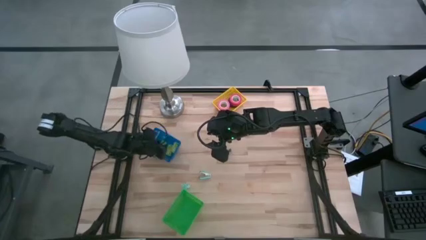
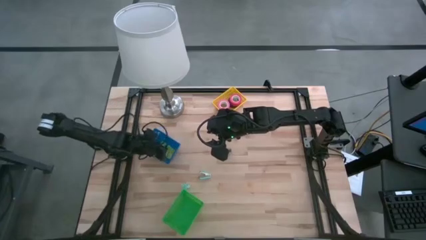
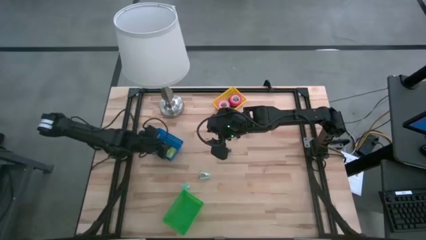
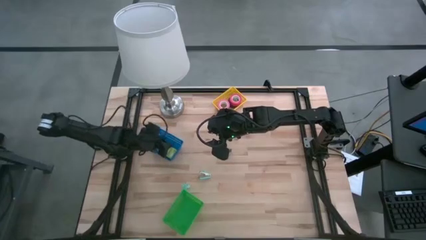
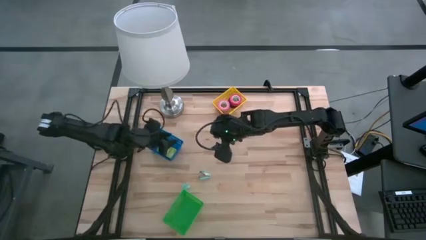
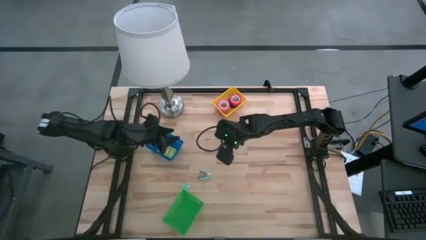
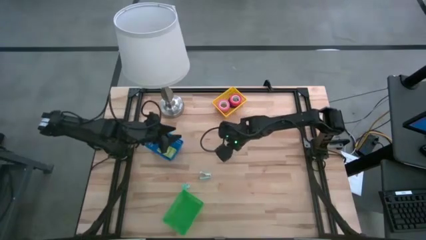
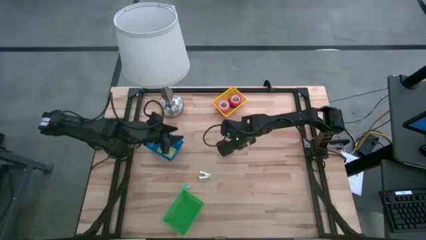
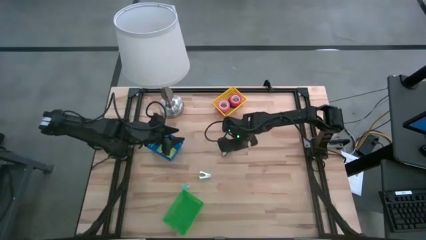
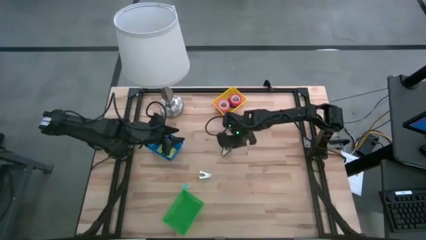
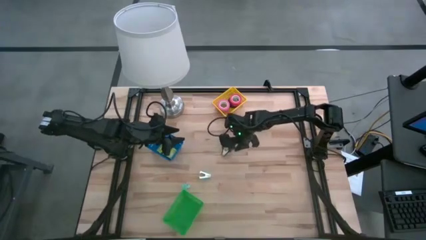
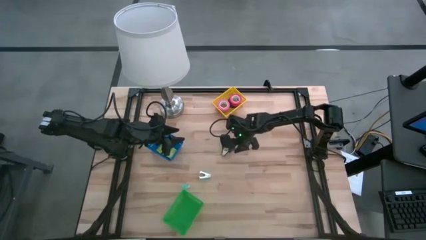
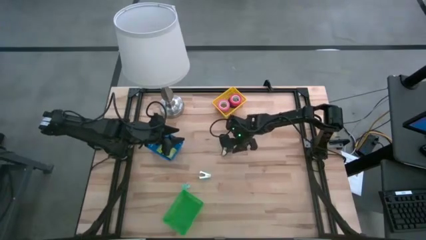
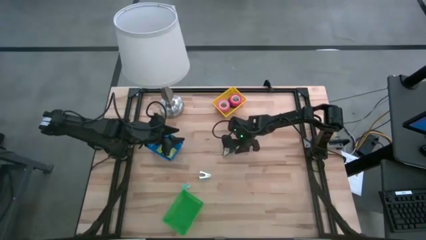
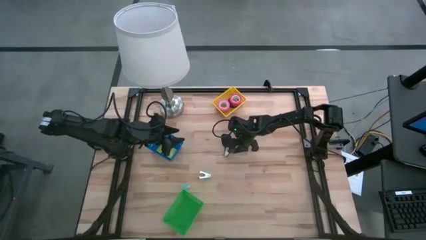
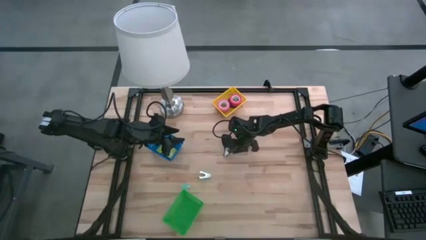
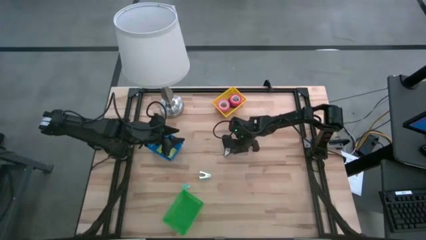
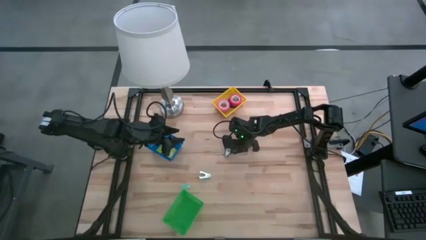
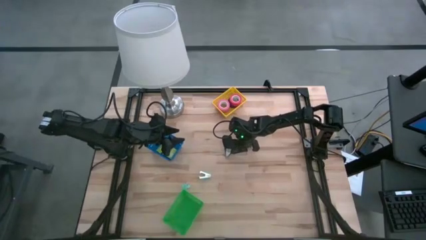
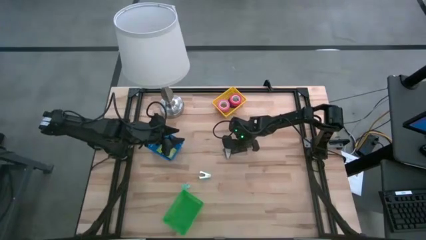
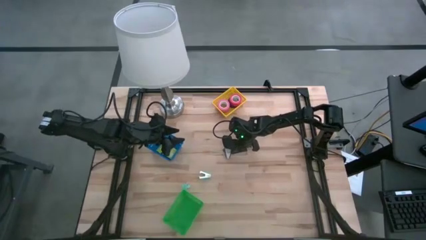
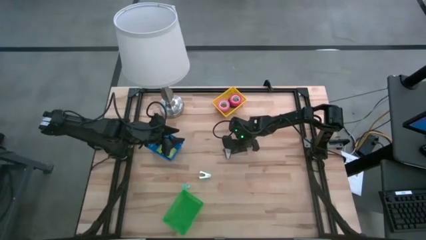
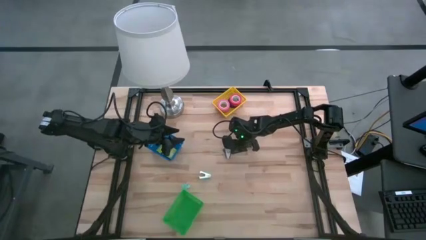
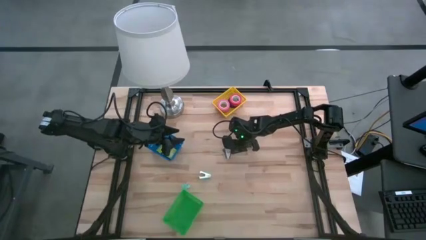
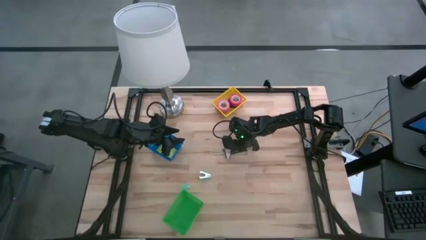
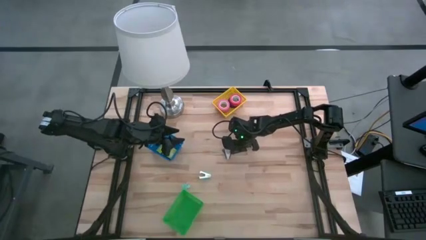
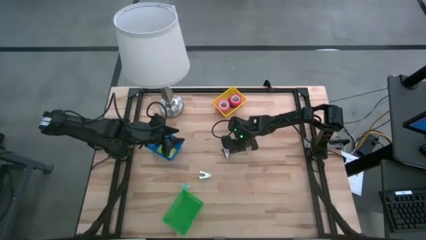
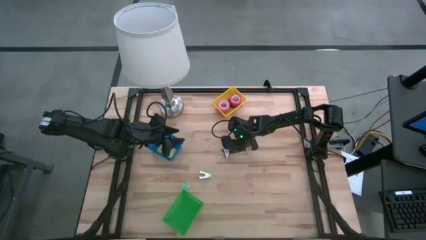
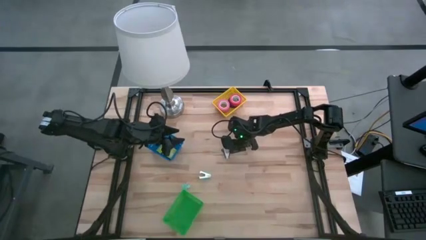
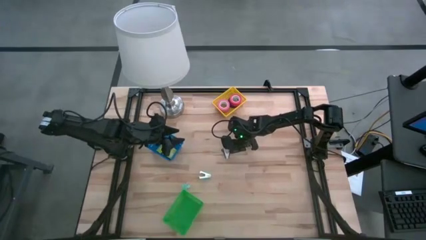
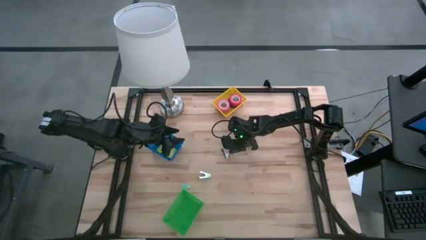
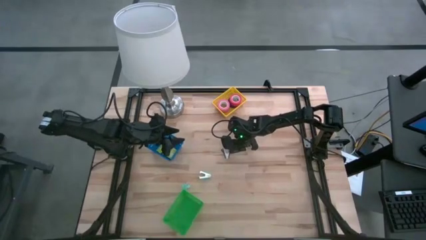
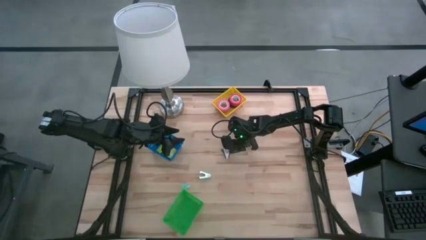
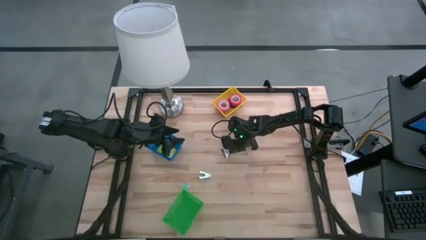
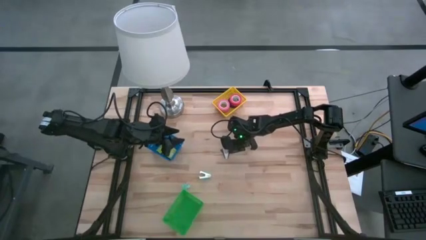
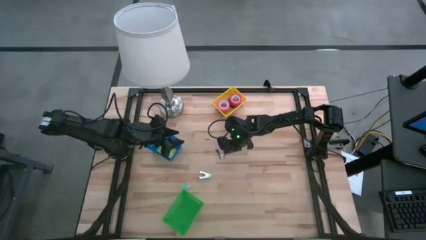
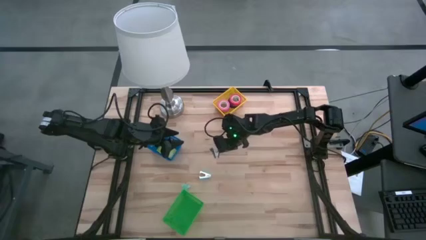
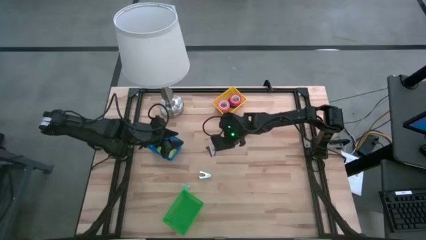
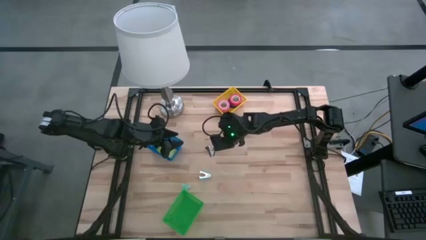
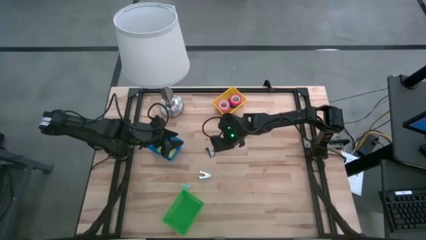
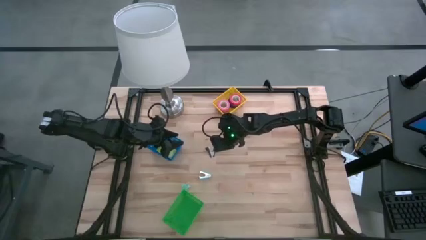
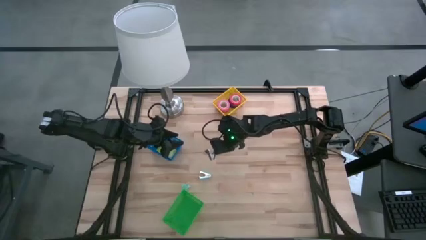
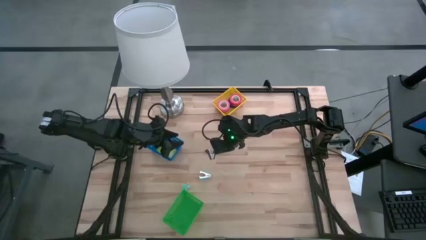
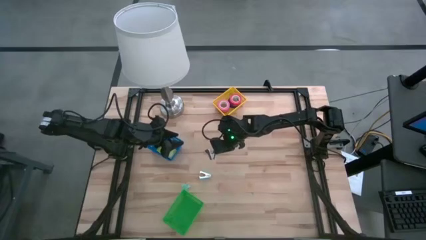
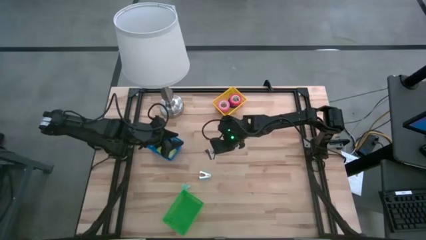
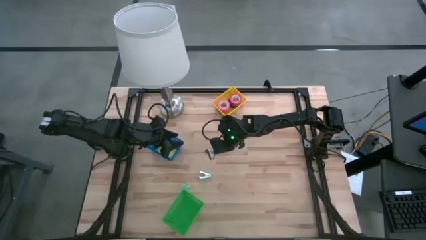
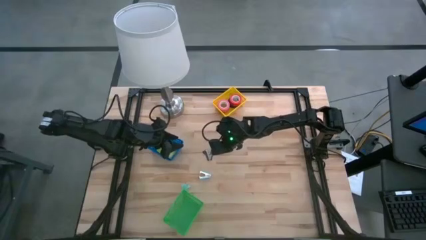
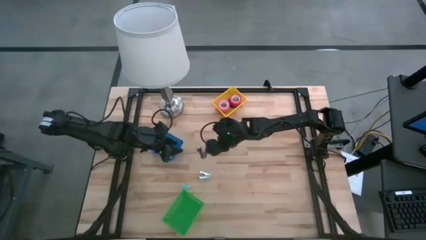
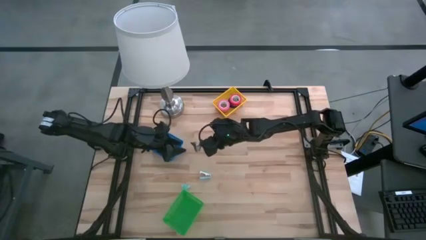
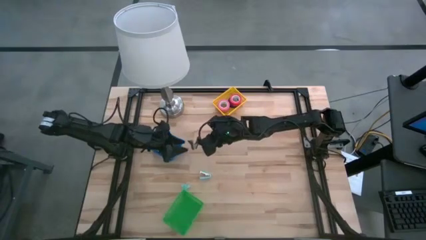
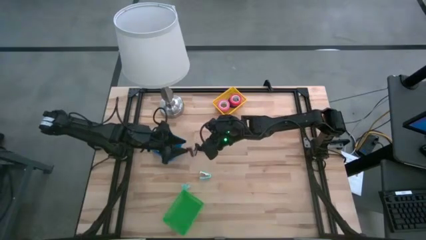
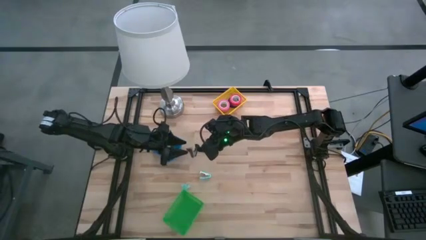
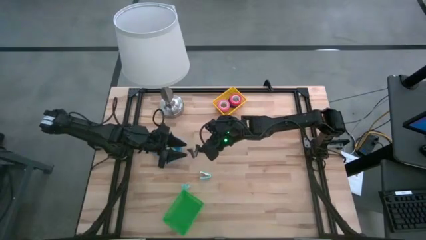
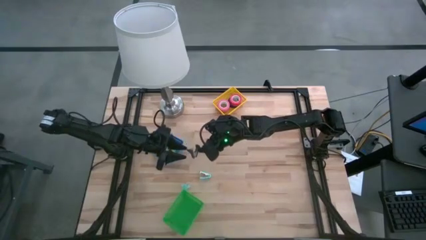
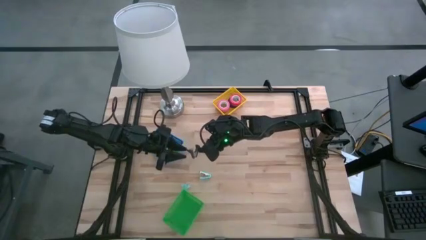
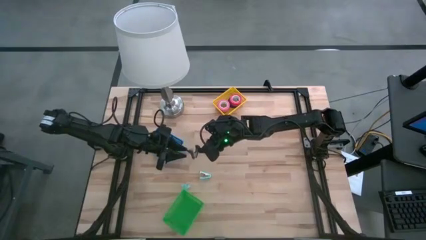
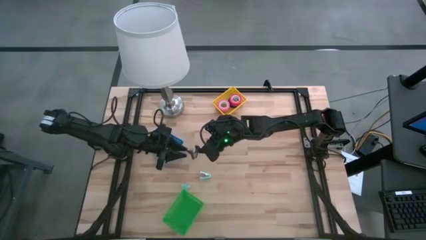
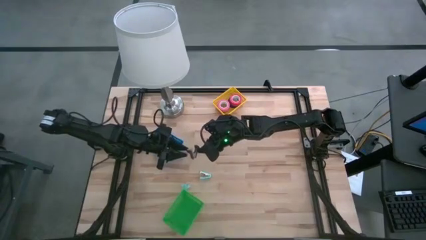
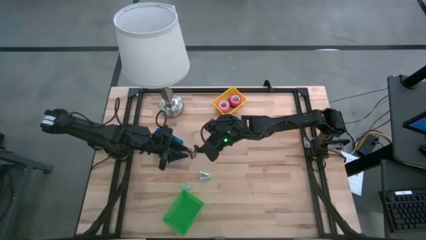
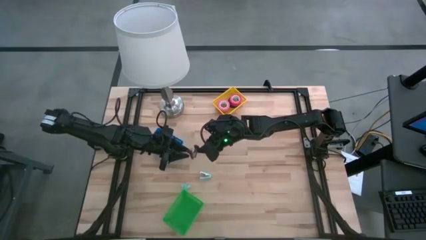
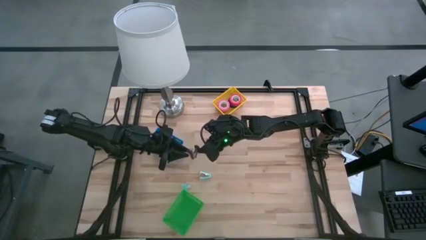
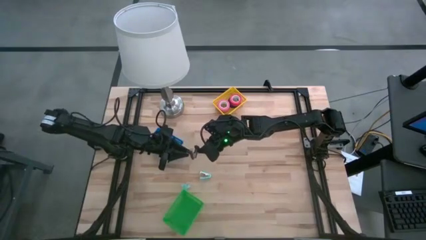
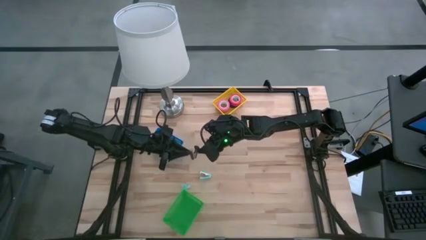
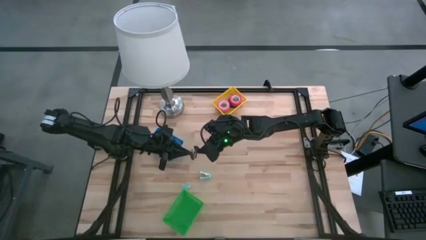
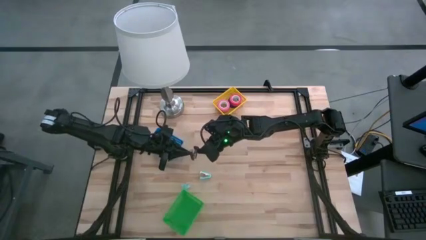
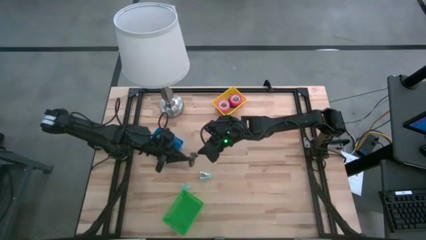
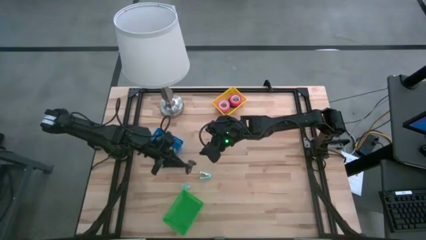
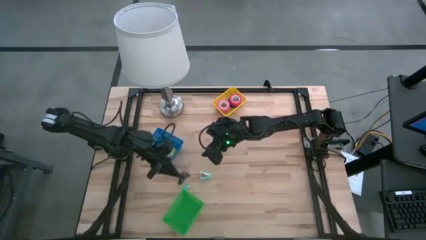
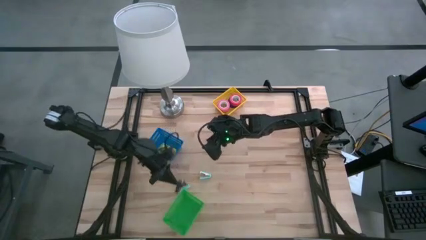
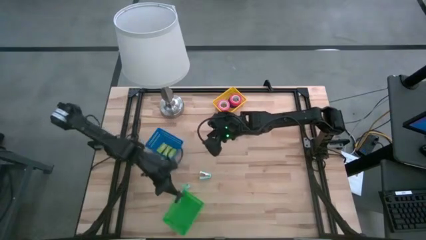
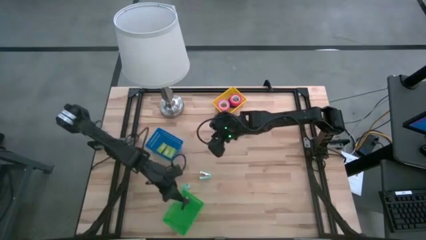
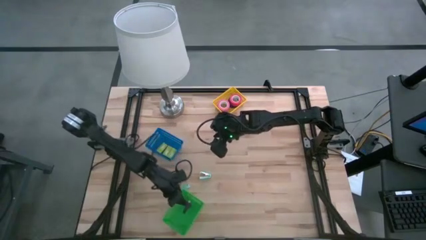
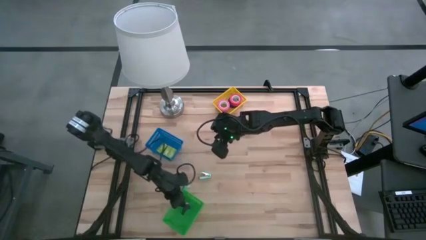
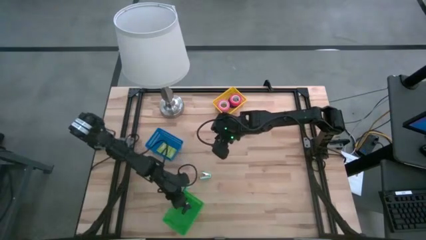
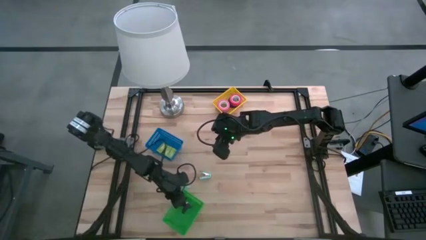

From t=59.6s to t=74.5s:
Task: Pick and place Stapler, Stapler remover, tape
Put the black staple remover into the green bin

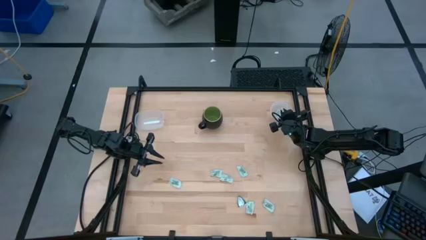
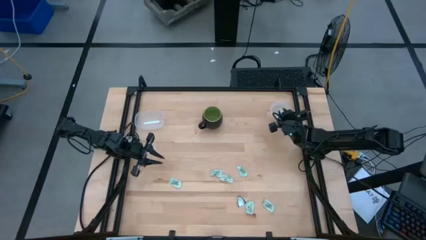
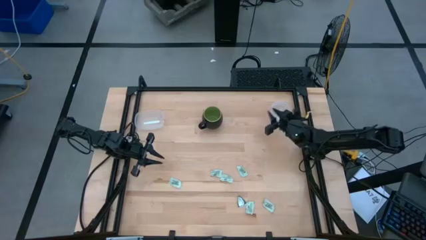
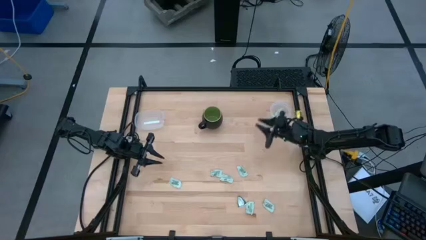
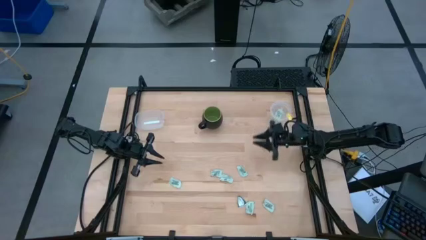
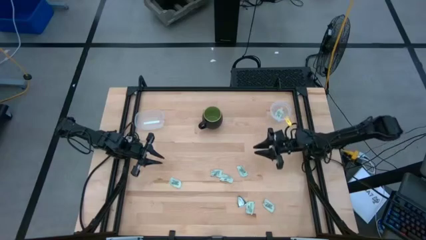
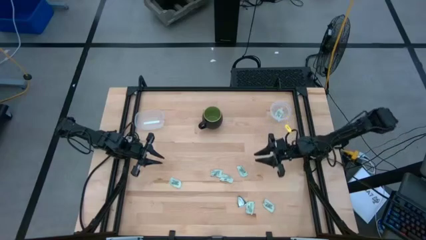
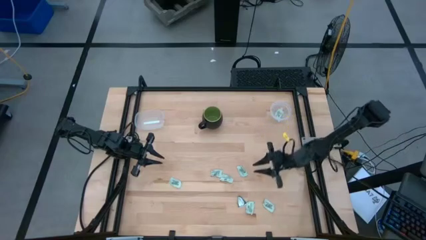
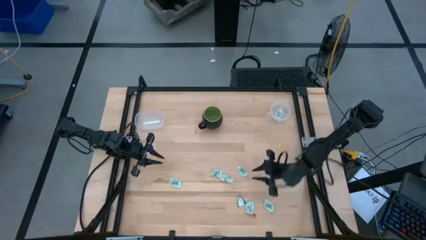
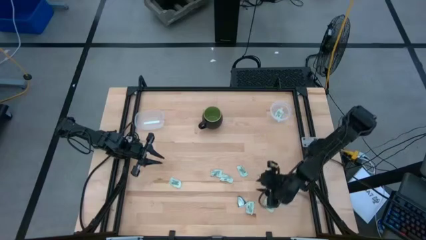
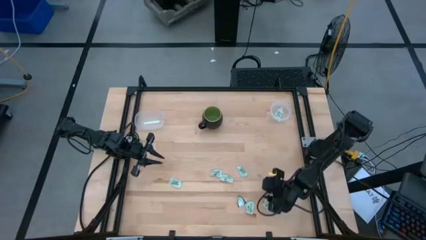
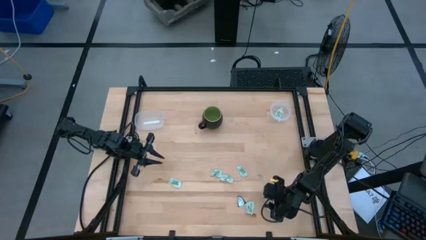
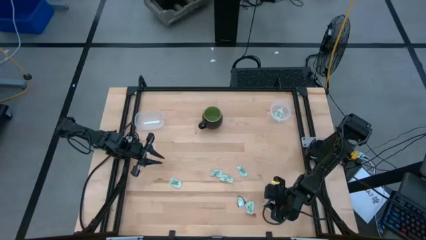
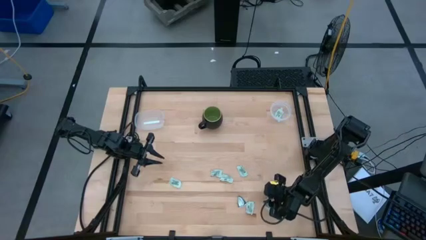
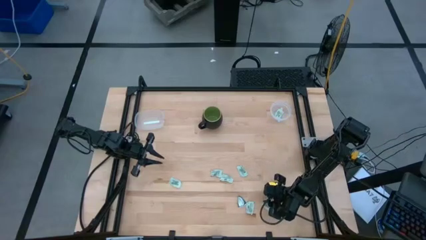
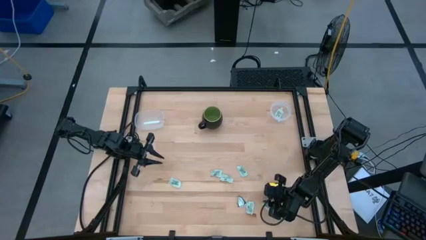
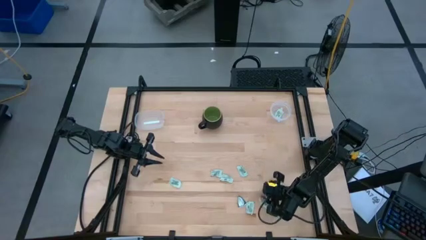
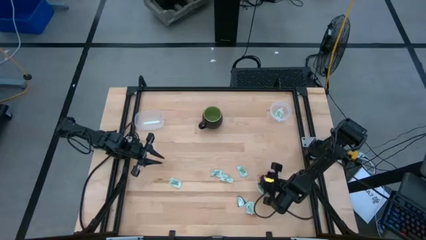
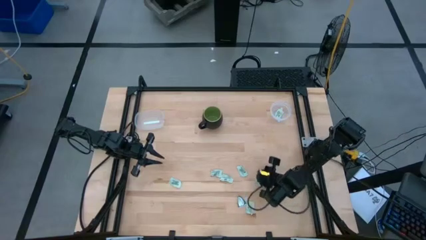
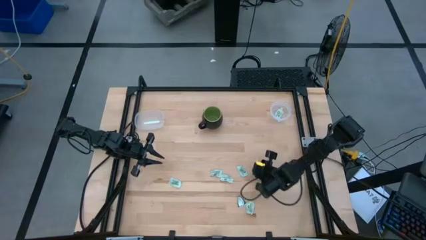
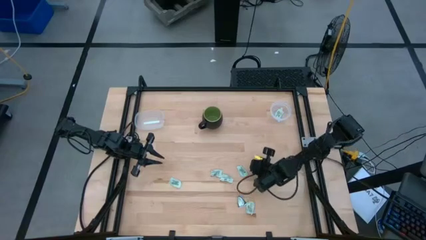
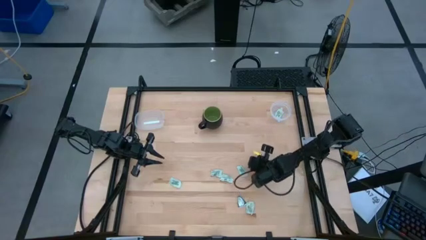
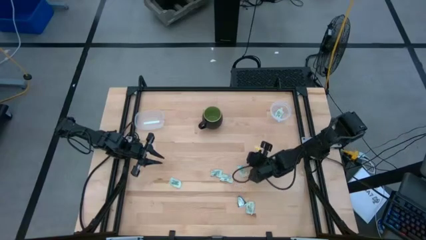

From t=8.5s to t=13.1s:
Task: Pick and place items into bin
Put the white stevia packet into the right transparent bin
